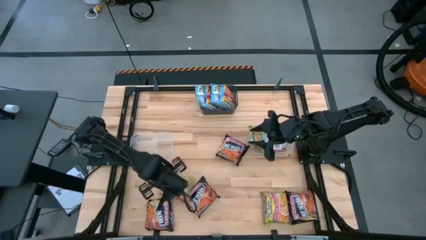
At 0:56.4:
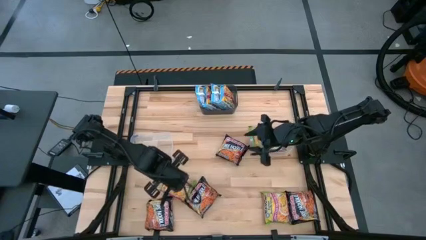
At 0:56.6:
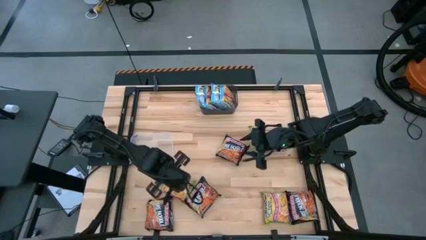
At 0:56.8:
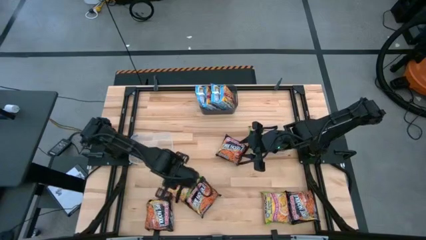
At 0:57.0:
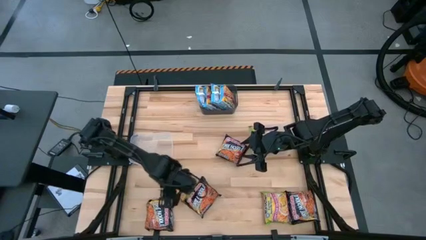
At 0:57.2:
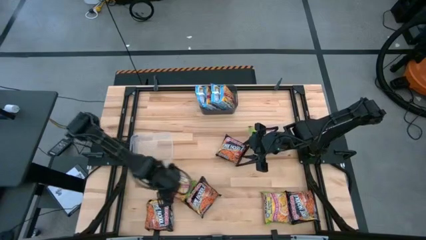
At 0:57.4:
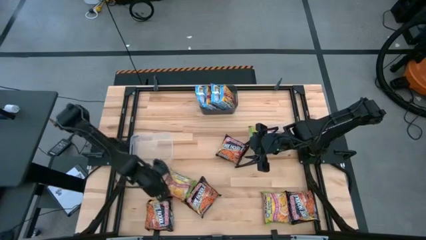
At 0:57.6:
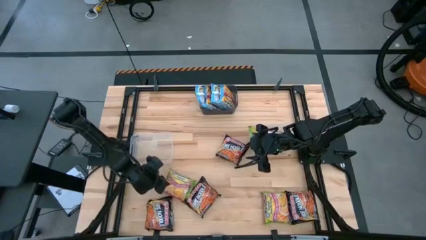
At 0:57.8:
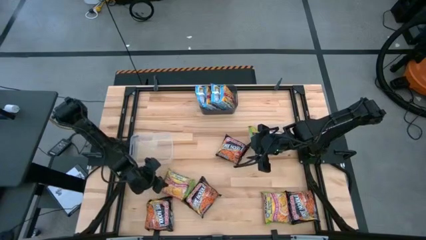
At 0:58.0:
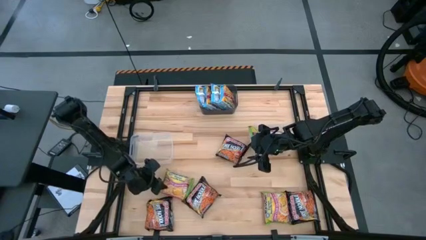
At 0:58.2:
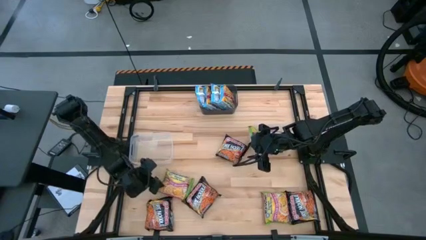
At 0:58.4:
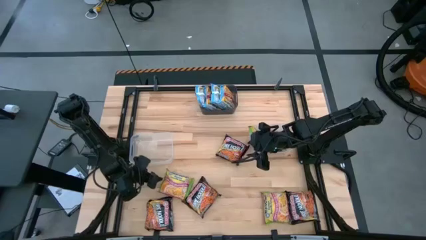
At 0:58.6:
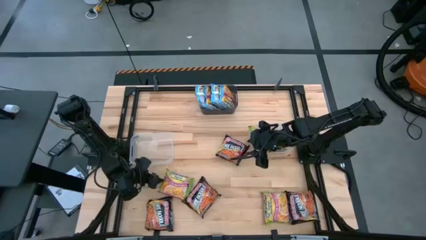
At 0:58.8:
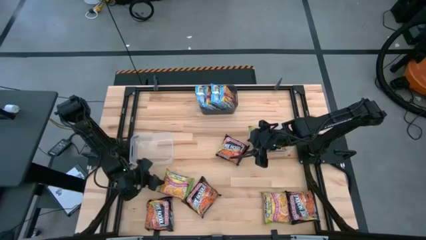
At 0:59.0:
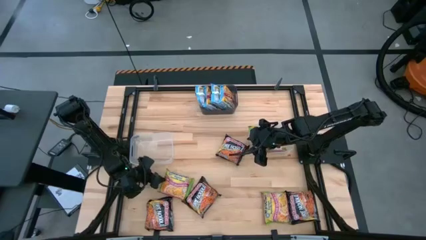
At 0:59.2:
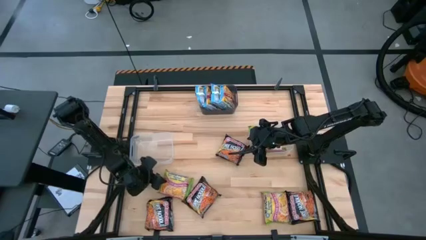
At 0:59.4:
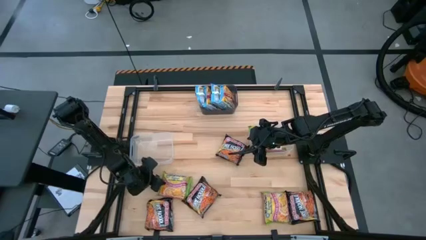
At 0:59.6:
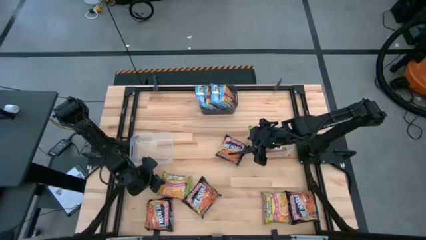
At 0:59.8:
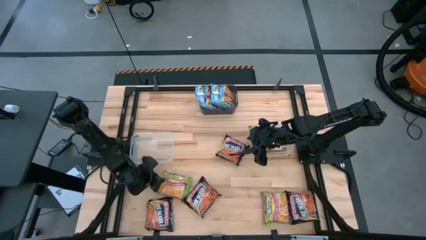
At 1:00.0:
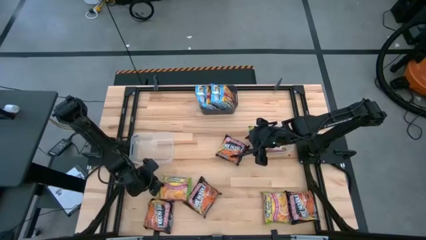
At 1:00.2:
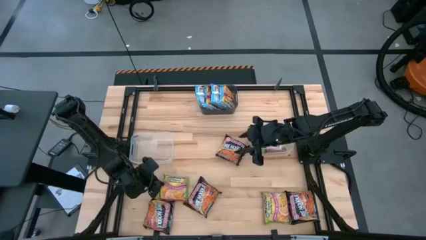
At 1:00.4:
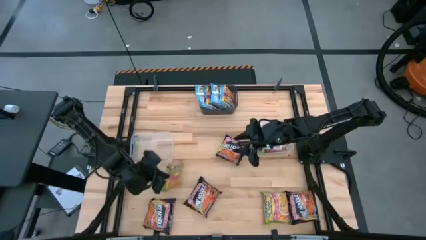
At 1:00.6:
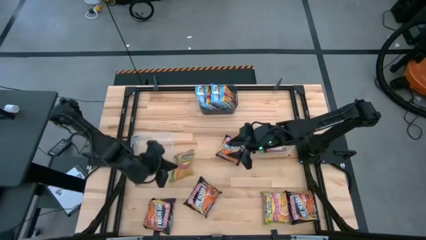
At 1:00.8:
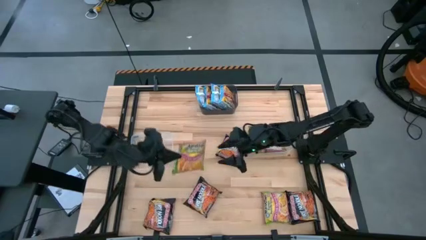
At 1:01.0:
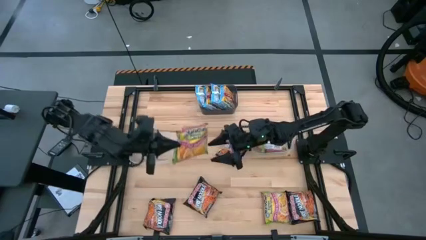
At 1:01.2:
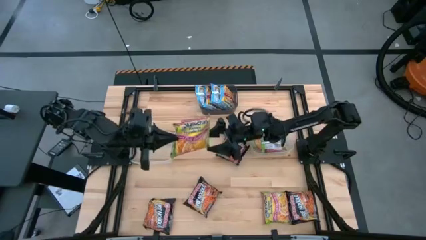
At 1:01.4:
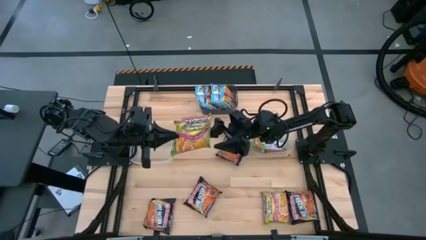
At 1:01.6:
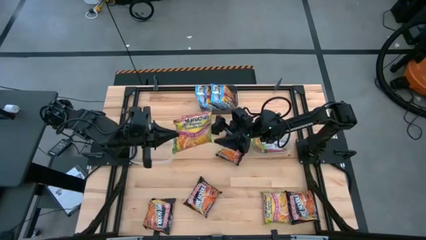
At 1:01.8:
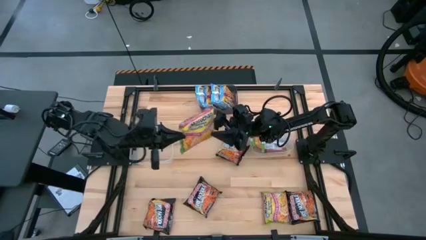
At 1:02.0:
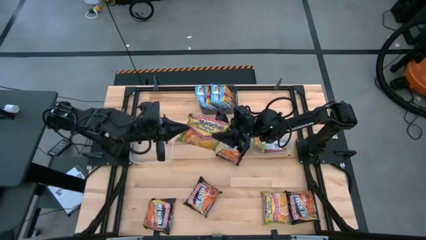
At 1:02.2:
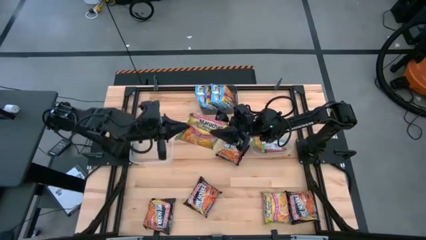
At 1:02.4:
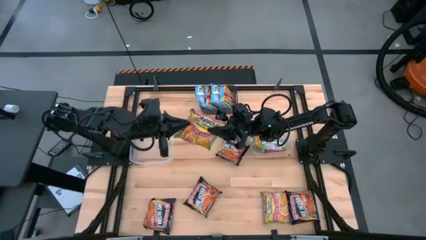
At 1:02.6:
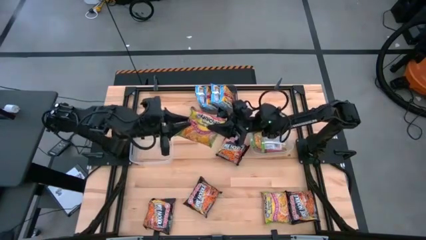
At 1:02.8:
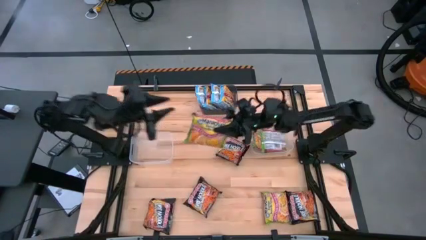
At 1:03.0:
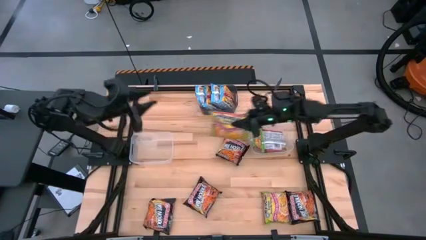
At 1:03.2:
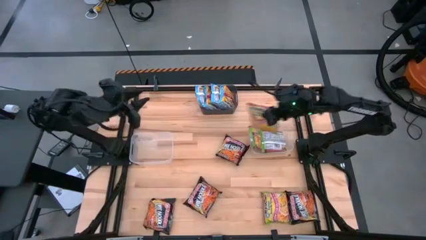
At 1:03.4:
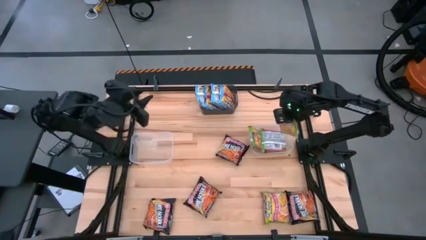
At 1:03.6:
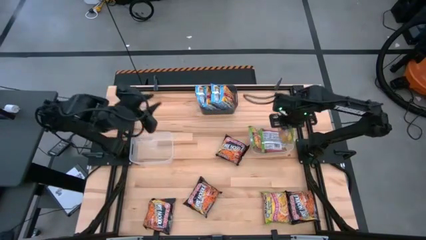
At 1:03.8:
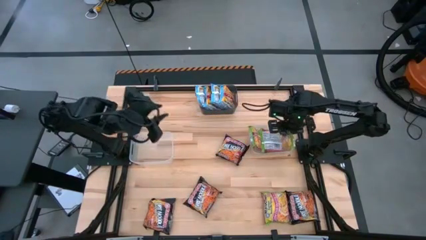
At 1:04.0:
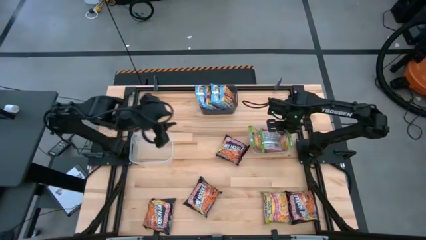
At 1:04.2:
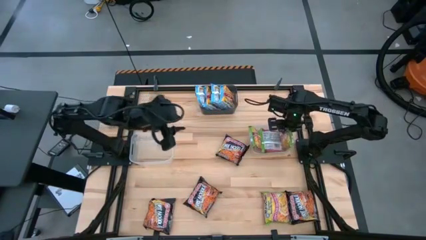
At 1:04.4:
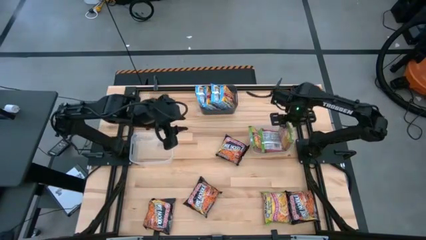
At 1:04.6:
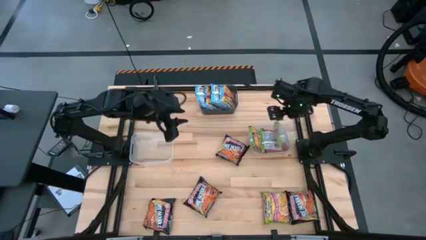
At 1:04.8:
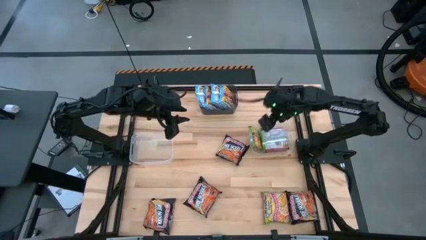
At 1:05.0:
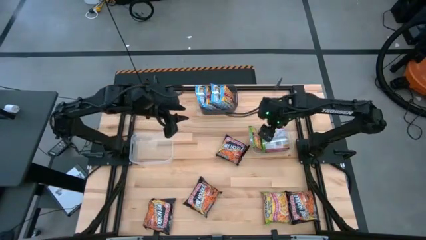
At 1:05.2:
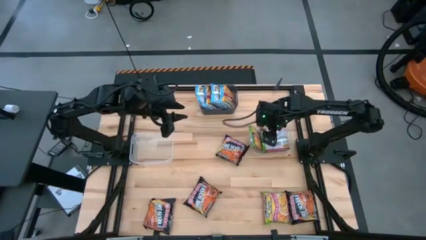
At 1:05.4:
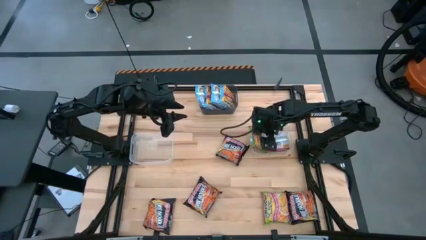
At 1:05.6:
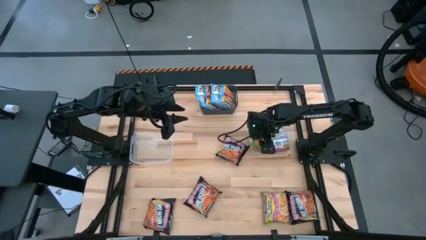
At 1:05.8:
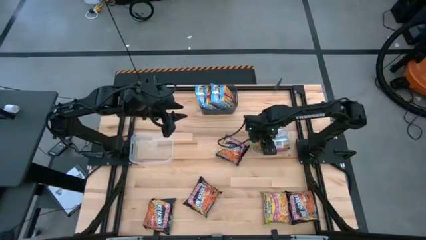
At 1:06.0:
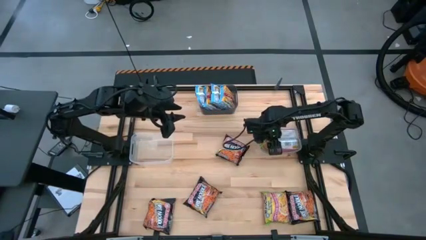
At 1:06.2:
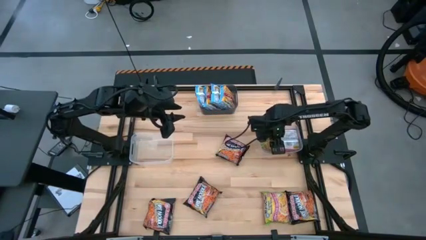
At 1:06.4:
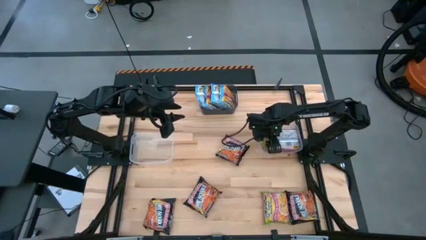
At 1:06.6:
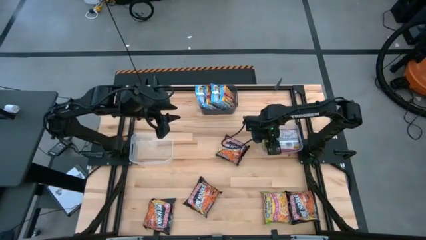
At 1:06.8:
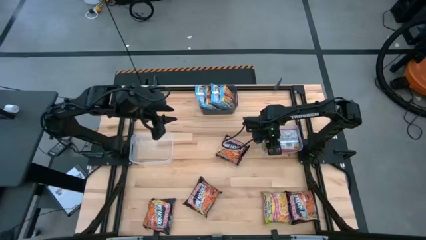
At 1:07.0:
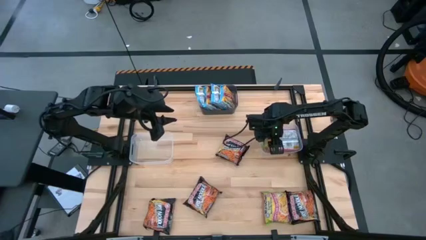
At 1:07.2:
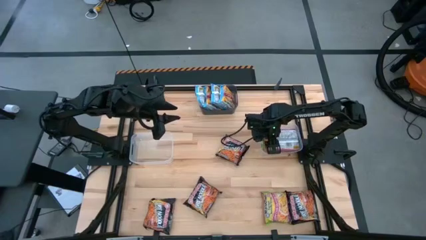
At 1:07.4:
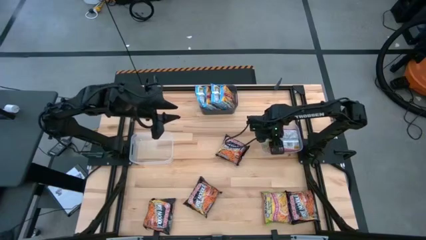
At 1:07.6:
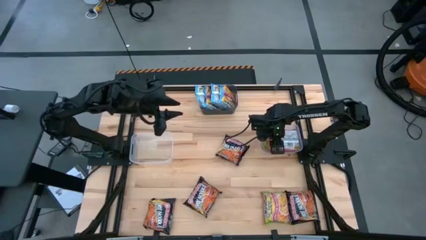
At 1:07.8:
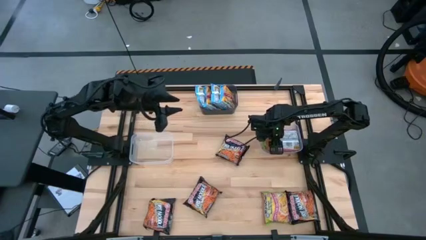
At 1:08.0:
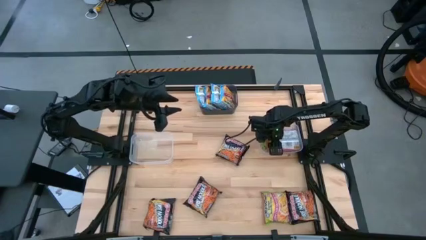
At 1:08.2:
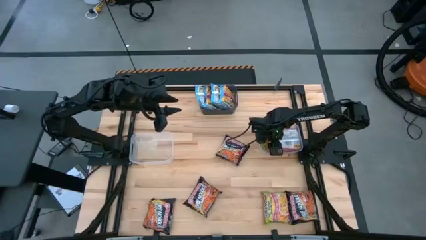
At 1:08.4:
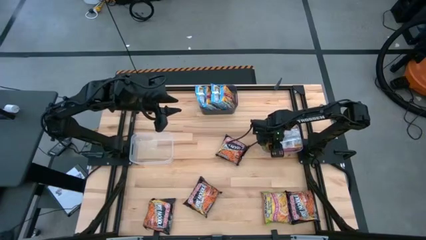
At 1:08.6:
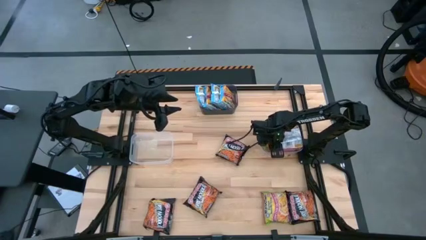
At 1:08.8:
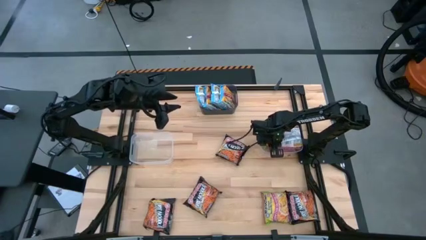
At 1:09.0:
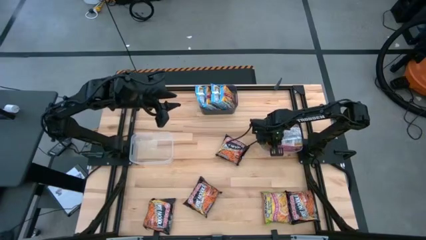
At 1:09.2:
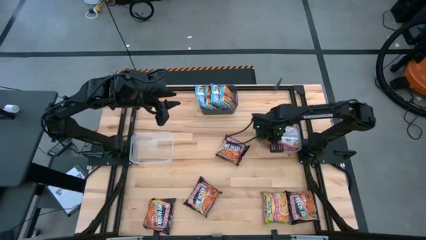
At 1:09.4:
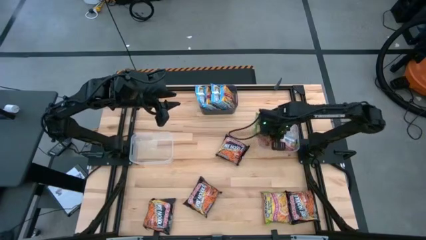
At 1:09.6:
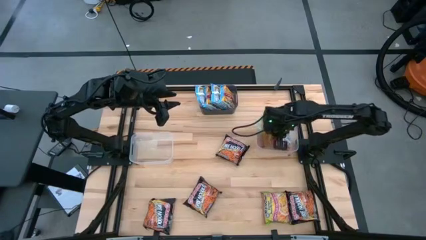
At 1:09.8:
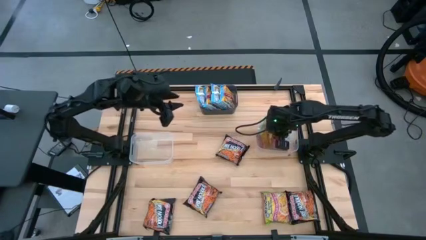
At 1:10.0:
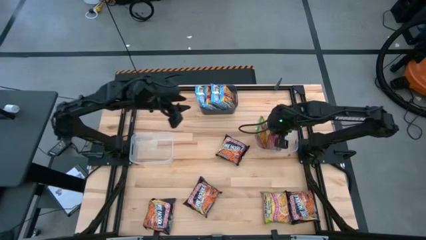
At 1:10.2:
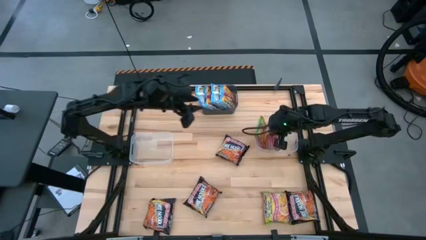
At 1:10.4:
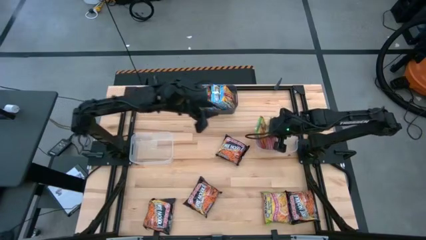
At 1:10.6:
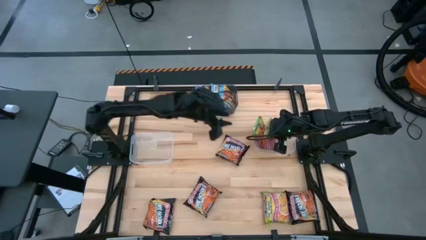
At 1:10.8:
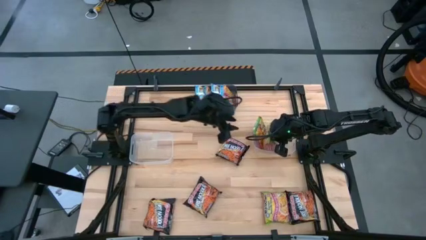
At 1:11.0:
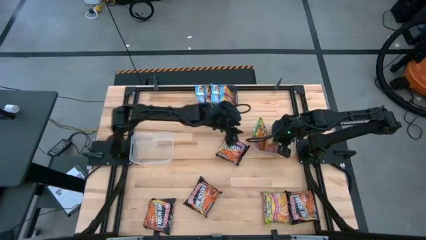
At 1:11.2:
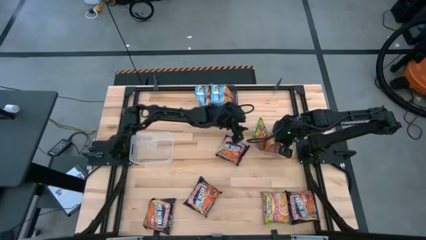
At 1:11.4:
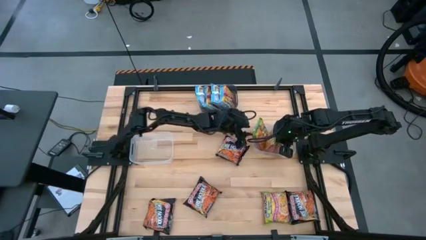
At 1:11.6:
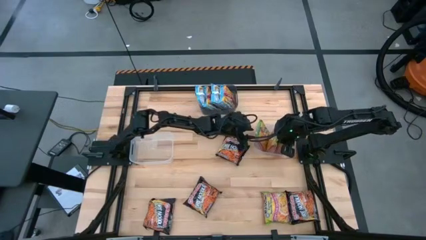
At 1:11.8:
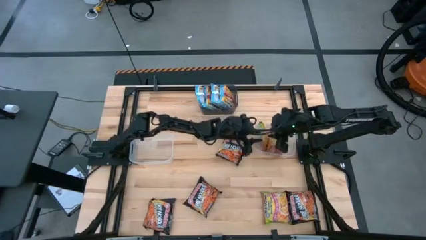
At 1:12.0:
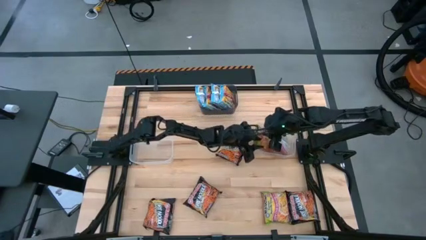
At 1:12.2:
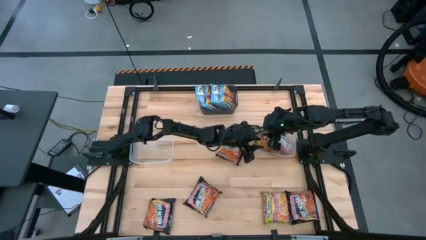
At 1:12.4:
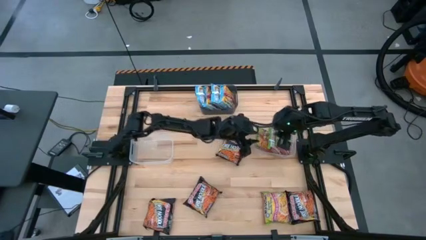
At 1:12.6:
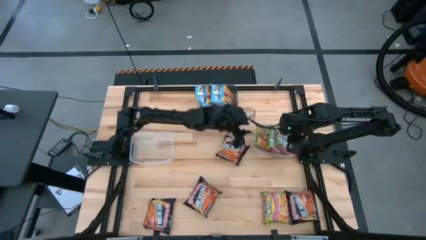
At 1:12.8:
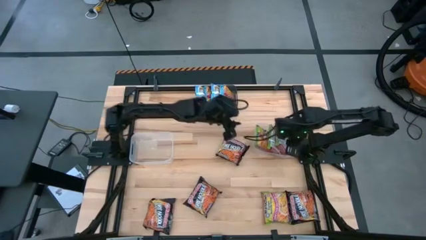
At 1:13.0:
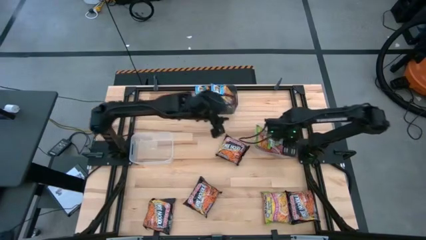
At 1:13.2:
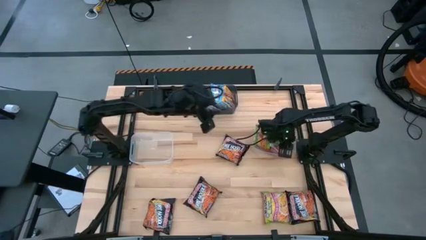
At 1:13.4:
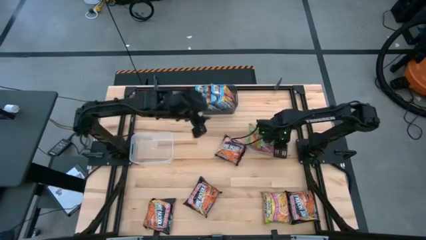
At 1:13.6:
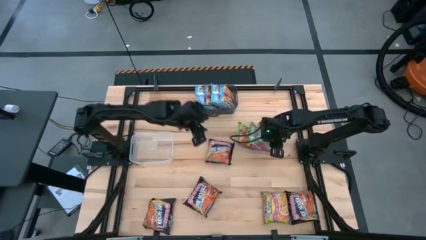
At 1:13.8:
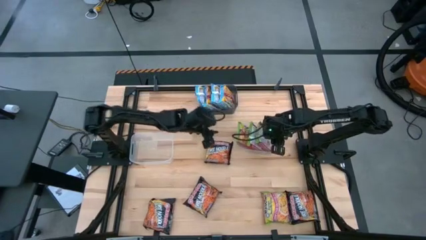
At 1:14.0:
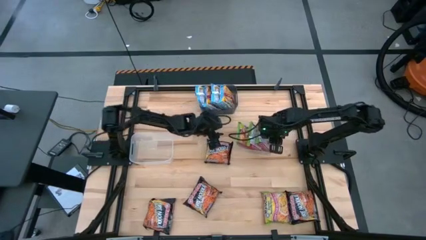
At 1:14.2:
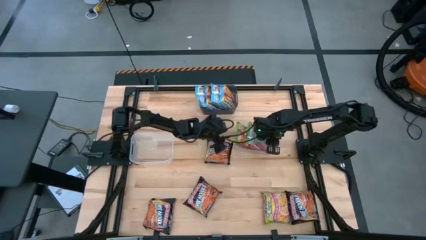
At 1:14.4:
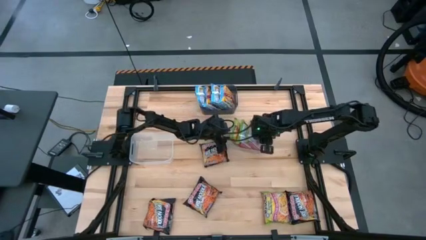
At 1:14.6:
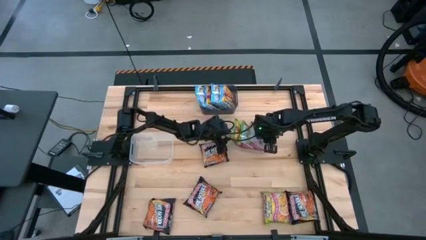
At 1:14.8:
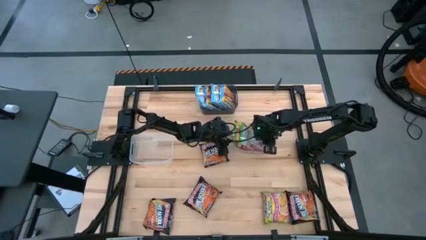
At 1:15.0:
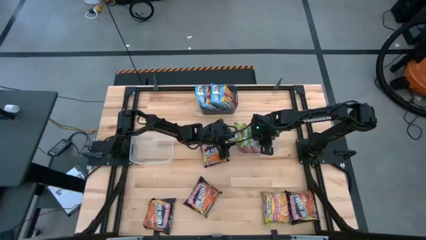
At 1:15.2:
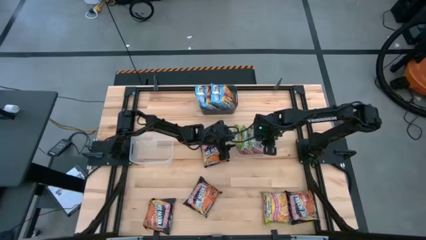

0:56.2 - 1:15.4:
Task: Sort Maruchan noodles
Put the green noodle pack into the right transparent bin
